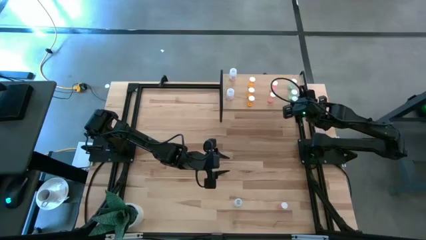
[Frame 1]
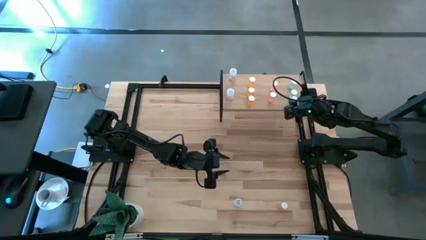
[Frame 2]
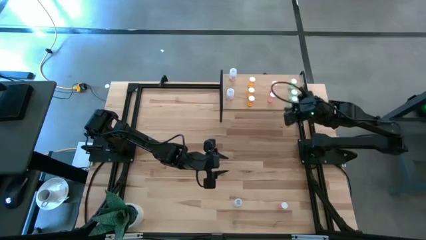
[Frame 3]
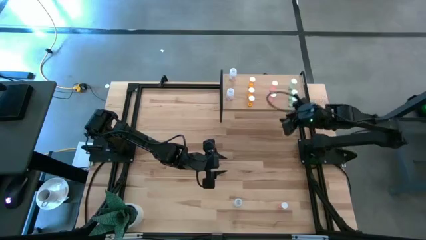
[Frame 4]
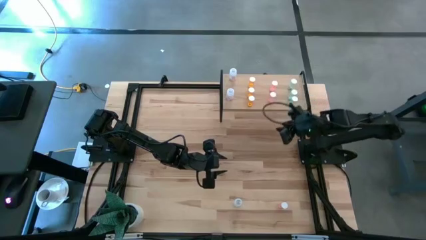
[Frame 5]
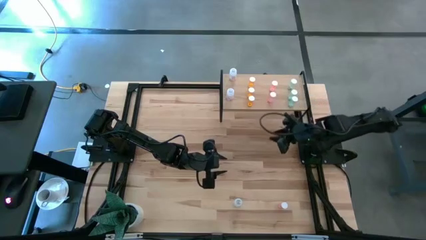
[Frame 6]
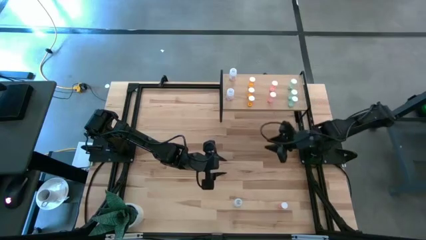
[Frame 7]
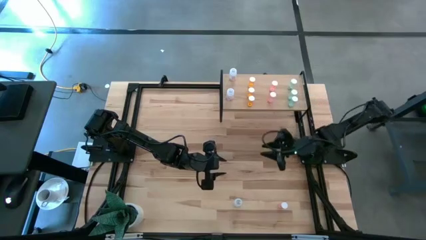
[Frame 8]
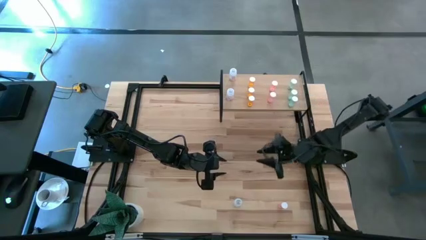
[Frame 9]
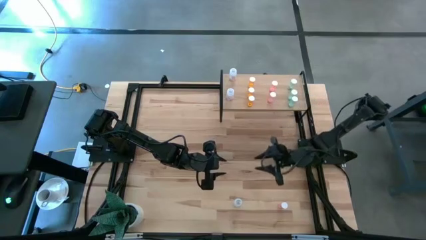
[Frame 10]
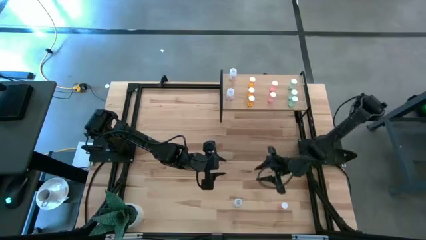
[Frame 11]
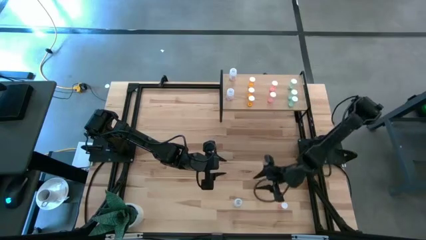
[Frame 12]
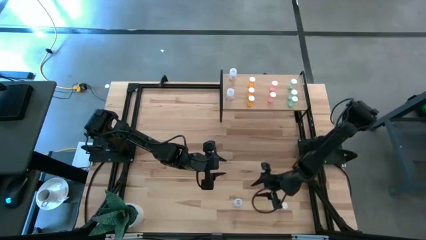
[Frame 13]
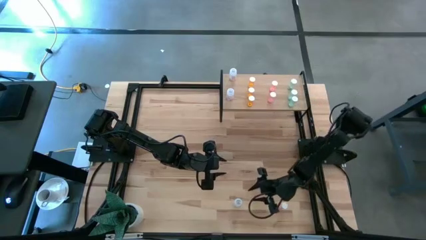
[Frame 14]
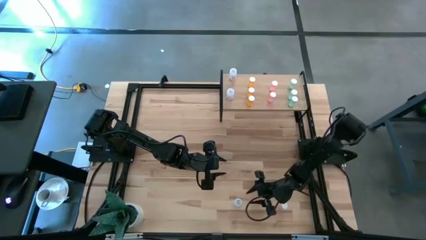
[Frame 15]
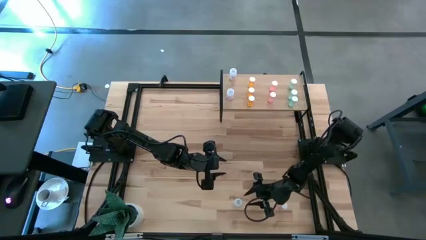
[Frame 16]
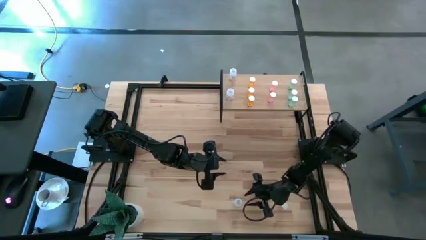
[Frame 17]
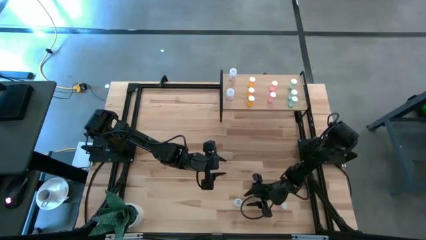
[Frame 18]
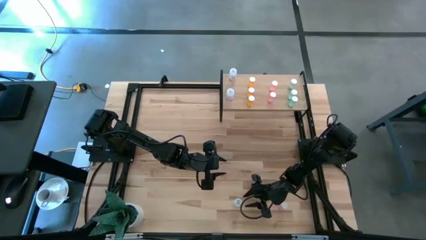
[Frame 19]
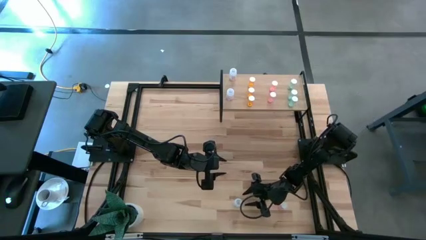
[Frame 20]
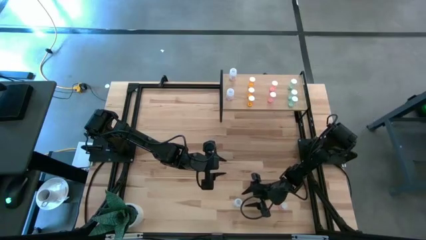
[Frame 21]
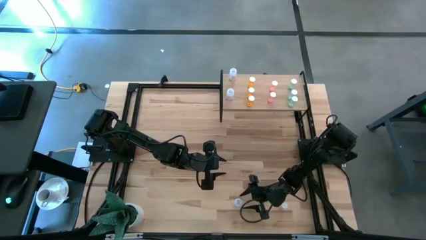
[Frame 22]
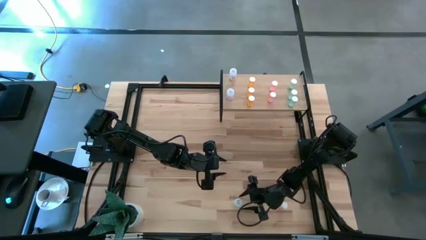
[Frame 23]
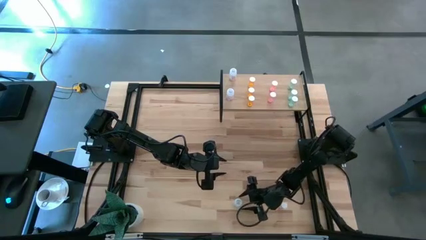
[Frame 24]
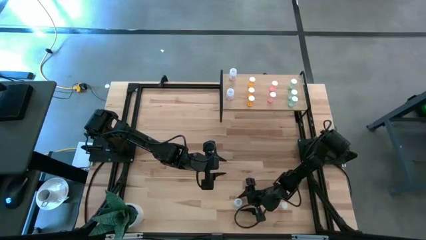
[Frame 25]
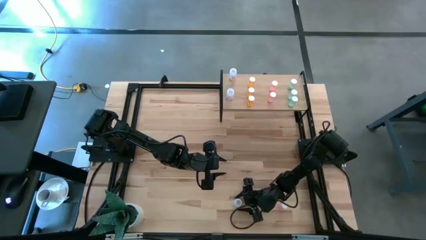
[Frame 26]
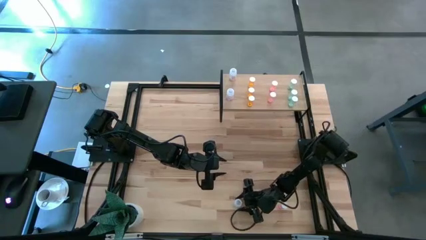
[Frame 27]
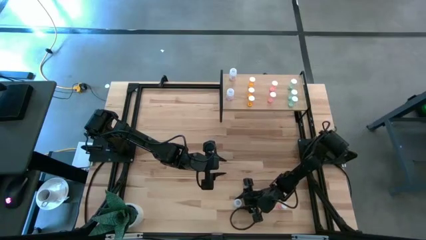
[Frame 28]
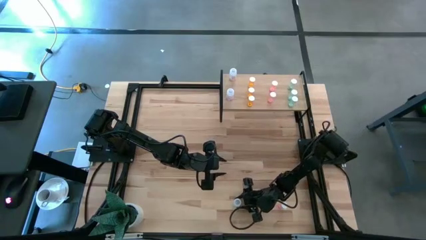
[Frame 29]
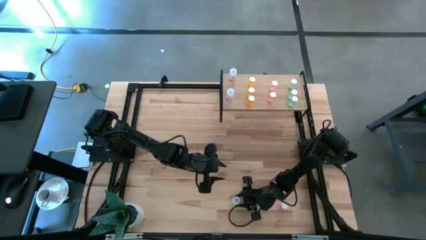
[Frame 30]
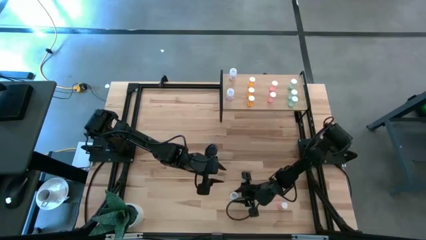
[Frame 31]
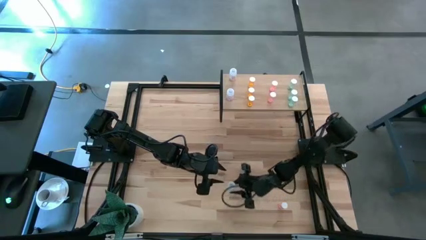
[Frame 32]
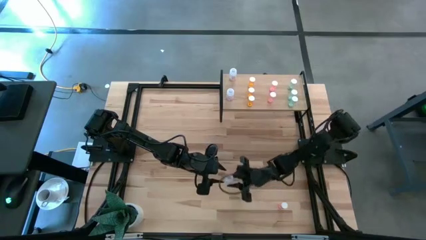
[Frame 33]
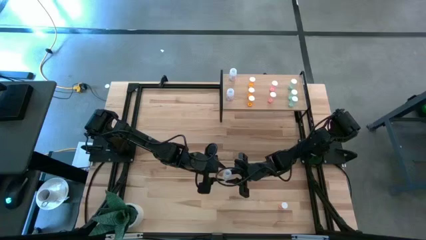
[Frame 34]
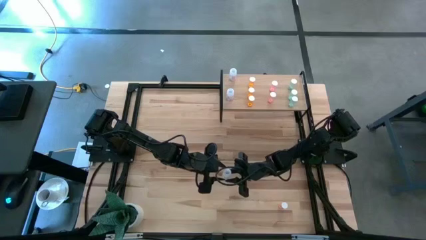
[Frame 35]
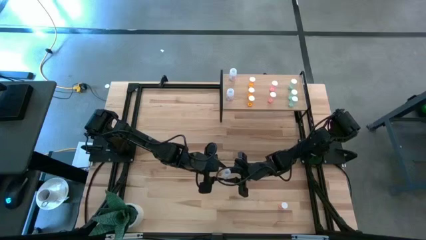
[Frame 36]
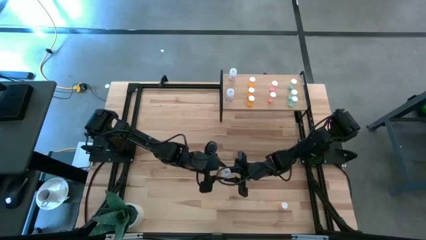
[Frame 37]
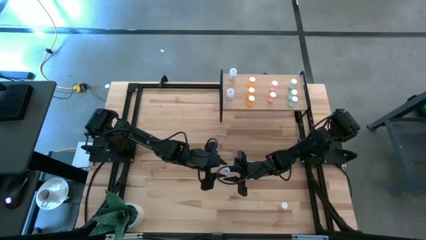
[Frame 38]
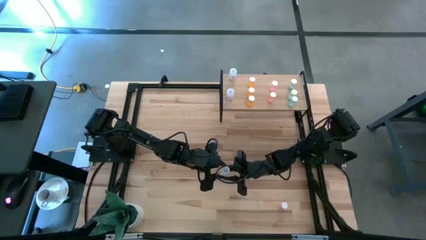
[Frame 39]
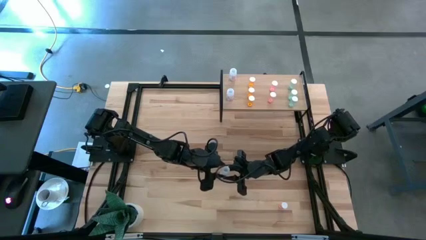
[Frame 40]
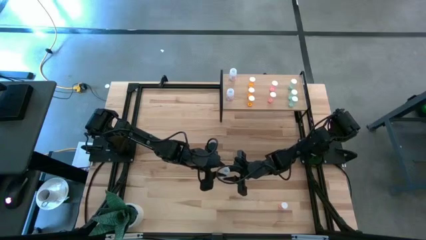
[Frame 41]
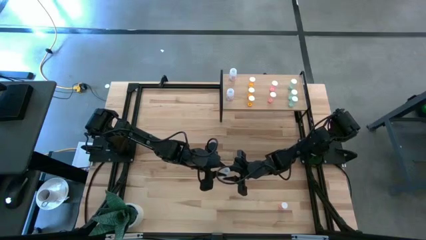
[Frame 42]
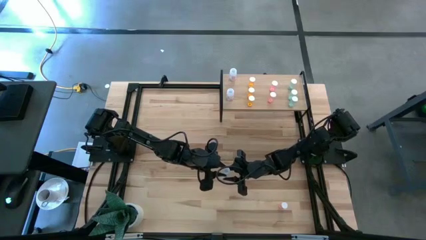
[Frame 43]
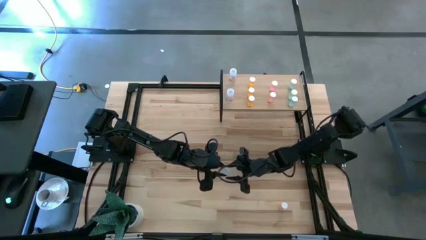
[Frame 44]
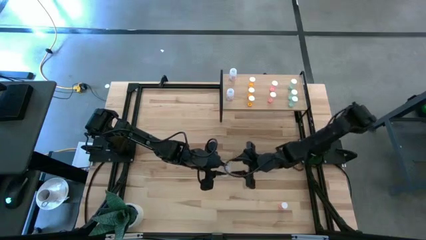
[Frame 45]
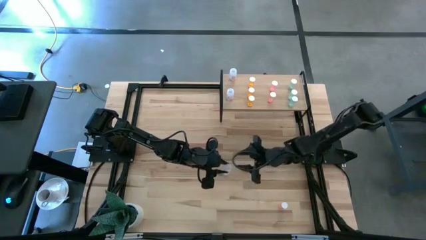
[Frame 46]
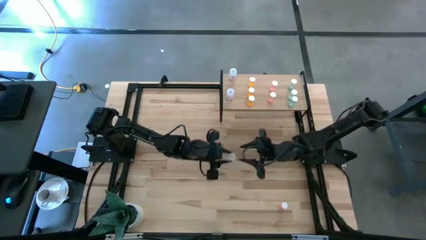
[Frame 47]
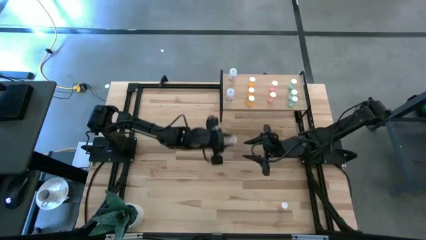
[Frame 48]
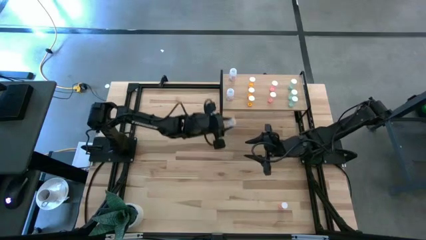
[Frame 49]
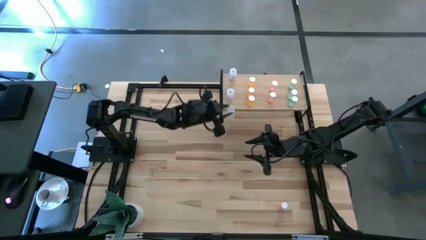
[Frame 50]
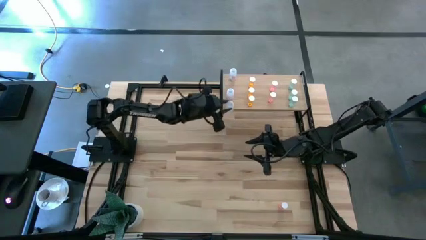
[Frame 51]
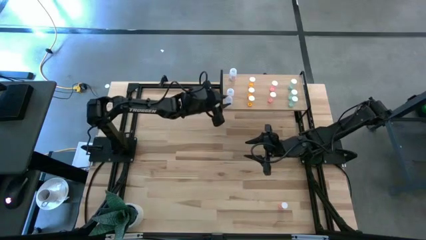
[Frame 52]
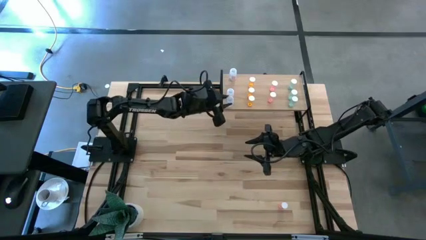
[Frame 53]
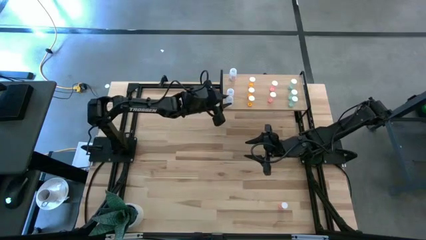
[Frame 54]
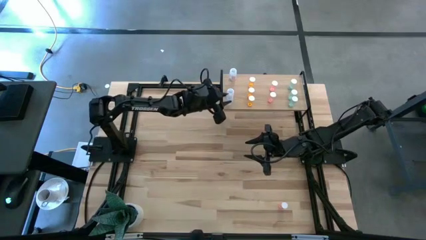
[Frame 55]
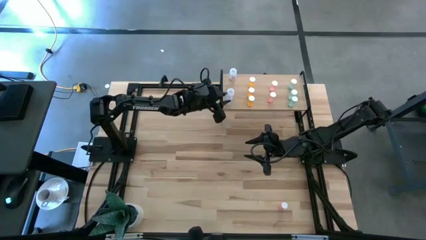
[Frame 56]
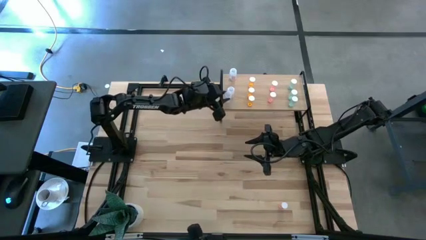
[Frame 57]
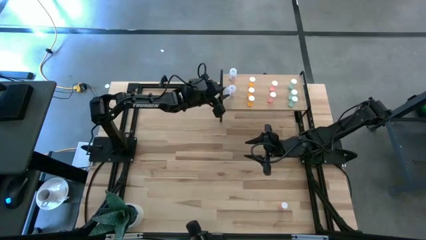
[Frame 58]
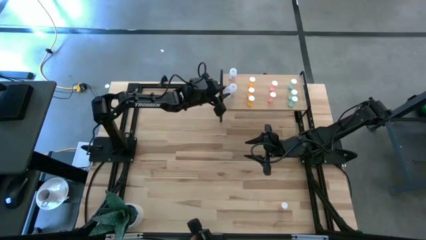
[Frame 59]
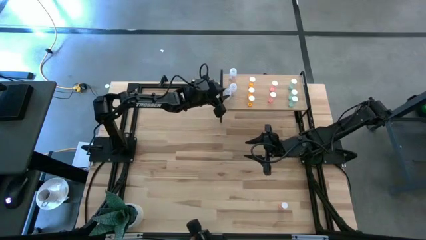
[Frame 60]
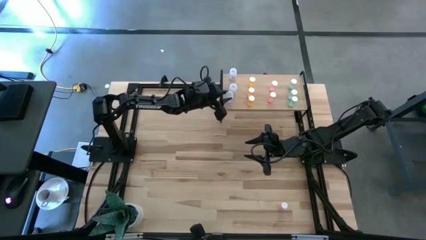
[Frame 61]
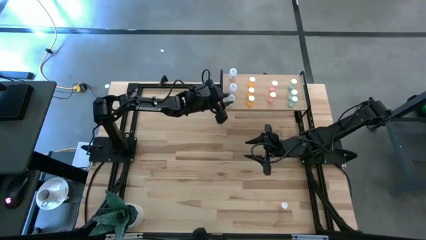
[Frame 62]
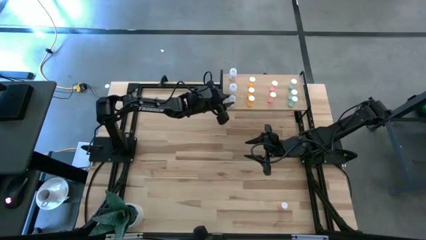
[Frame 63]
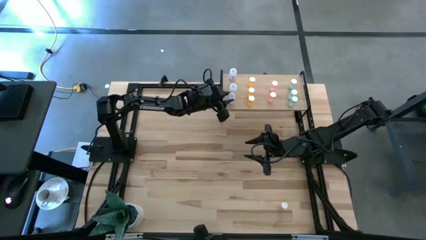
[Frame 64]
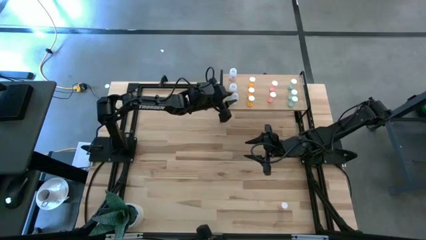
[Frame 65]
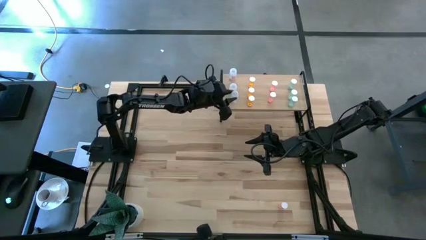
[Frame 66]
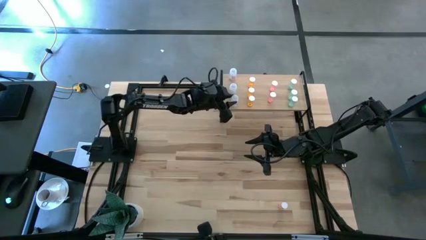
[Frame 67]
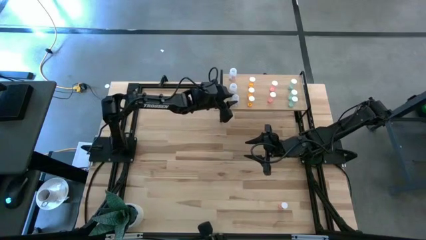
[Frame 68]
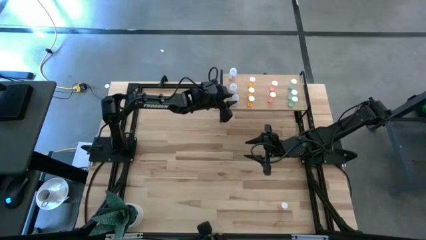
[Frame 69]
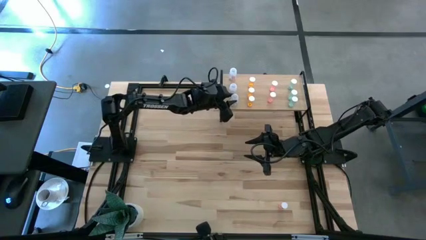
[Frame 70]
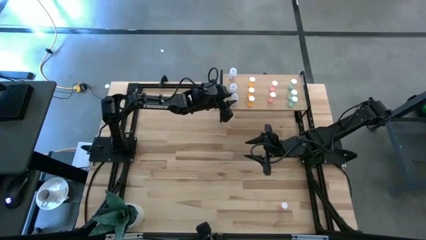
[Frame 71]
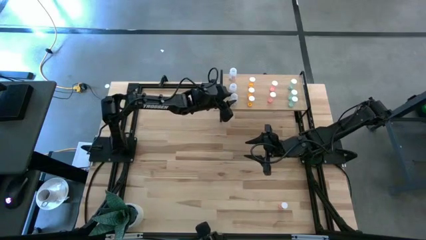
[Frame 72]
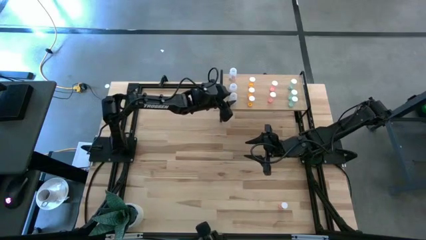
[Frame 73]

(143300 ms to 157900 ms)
Task: Pick and place medicine bottles onto shelf by color
Put the transparent pill bottle on the shelf aligned with the other transparent pill bottle
